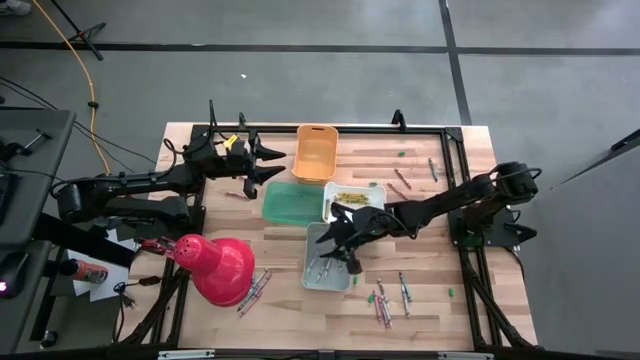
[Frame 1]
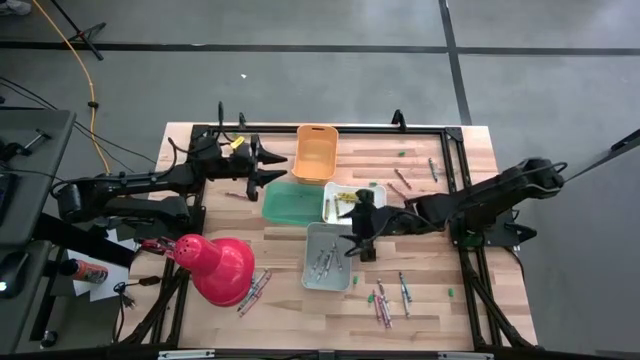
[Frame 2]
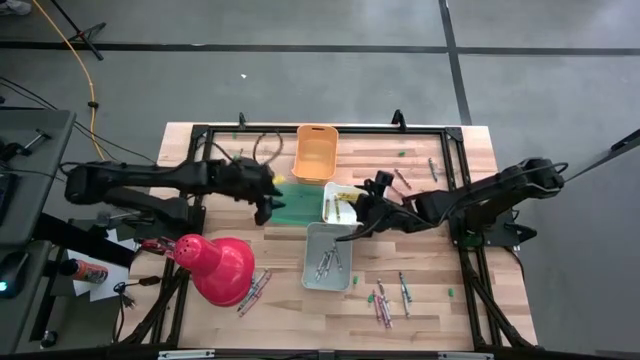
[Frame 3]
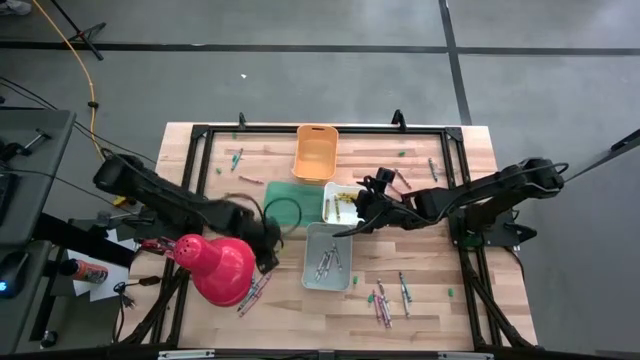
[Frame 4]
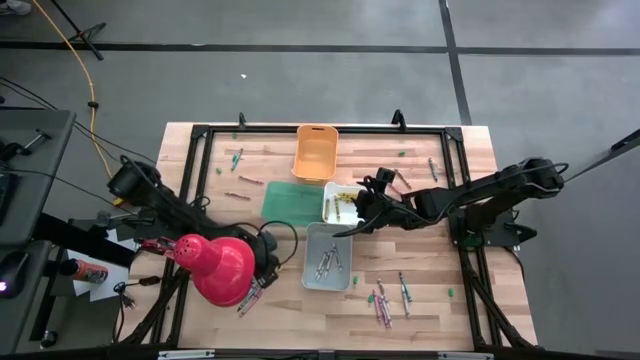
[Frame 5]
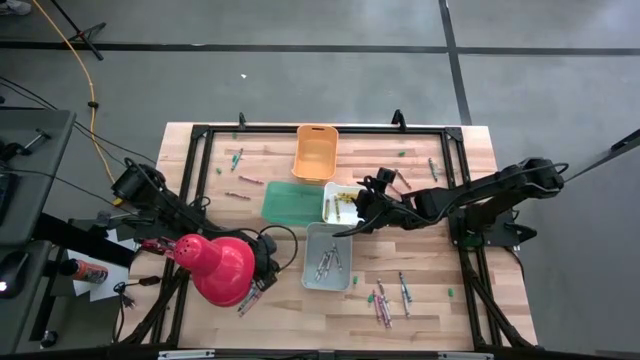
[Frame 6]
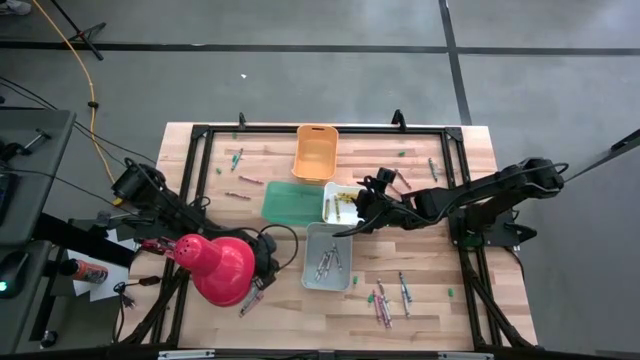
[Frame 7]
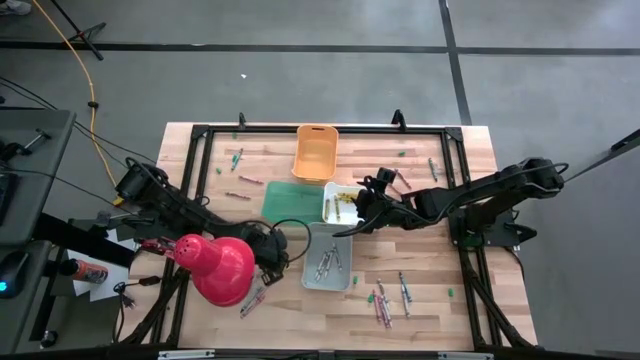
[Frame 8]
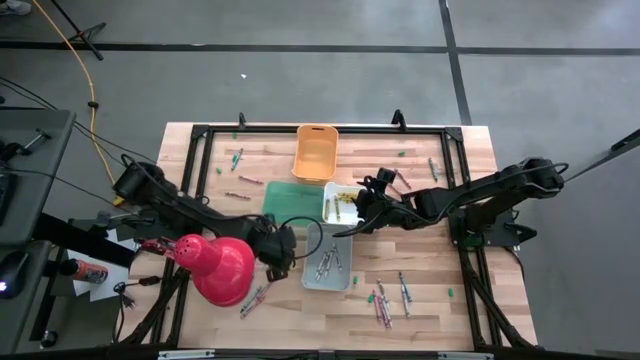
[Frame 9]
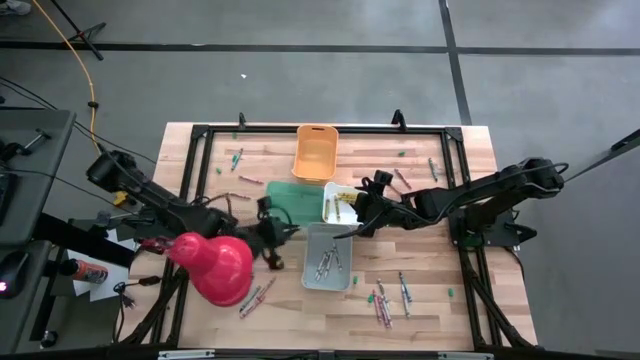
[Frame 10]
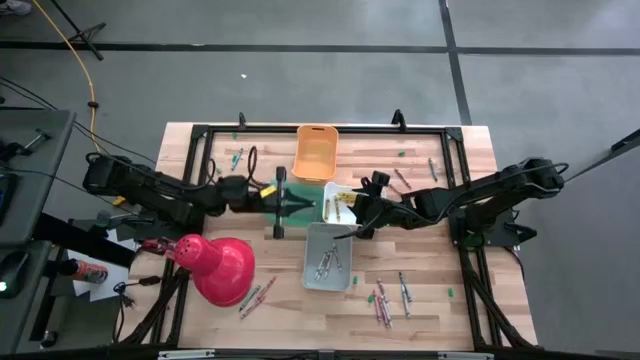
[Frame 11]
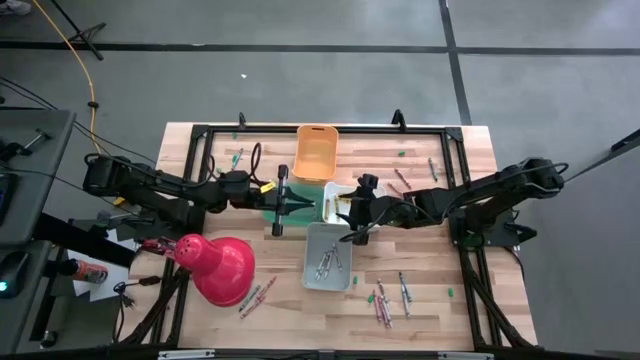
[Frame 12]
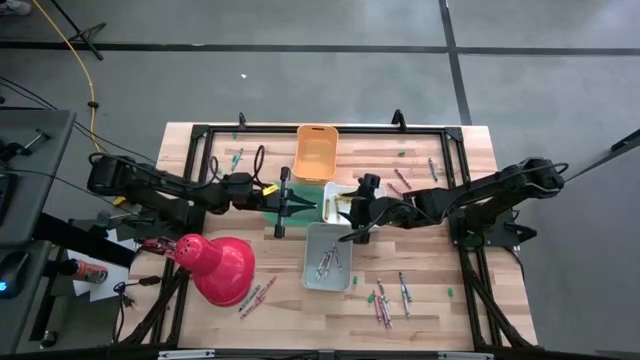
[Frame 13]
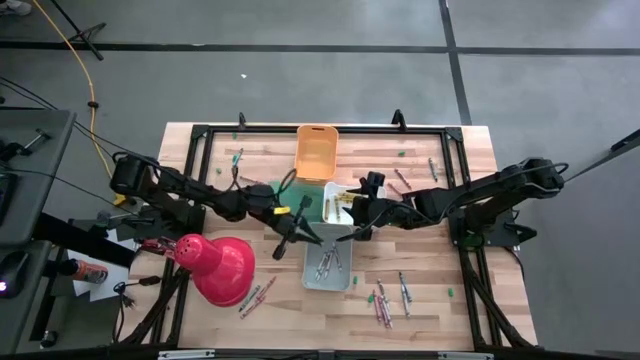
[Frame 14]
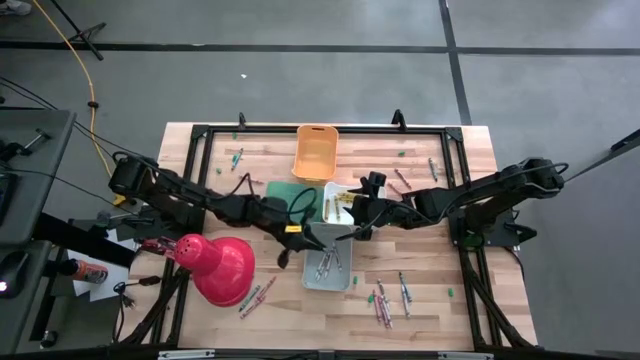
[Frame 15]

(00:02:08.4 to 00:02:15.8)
Task: Sort crayons
Put the white crayon into the gray bin

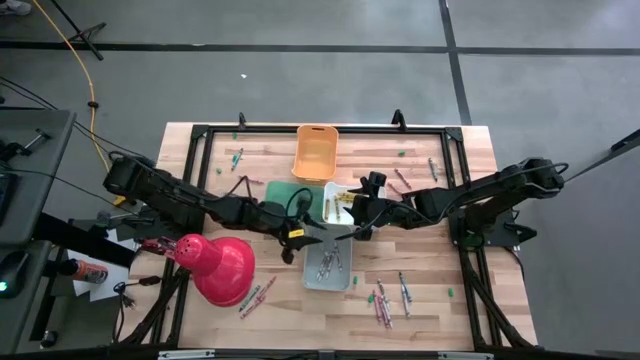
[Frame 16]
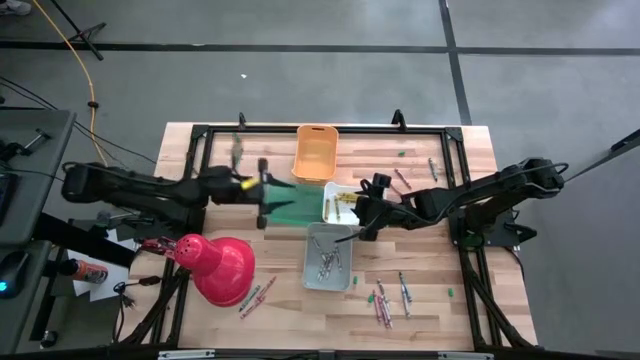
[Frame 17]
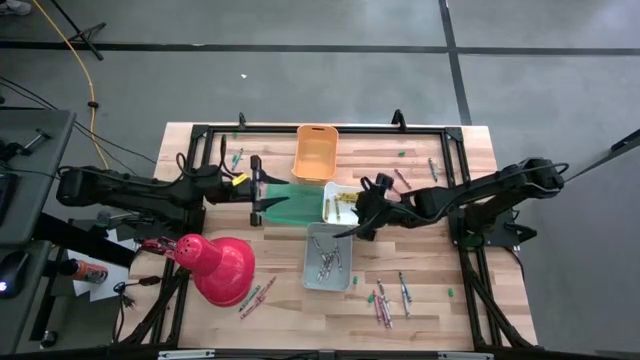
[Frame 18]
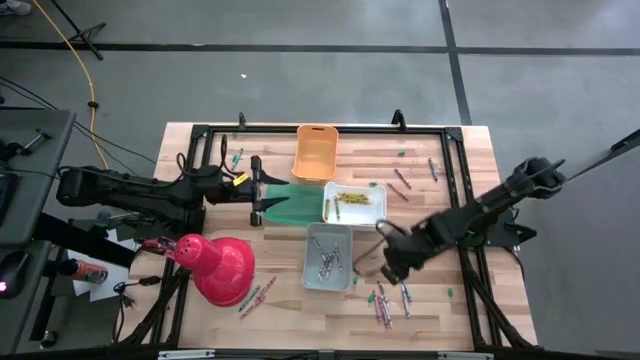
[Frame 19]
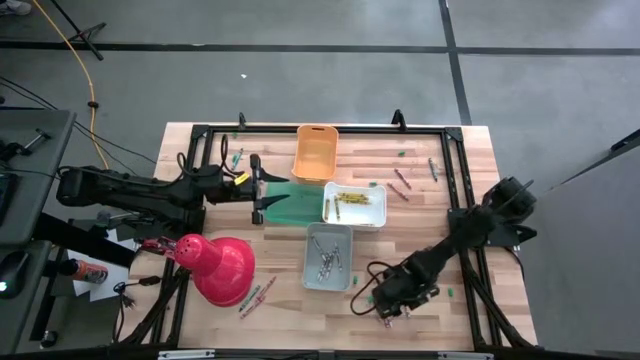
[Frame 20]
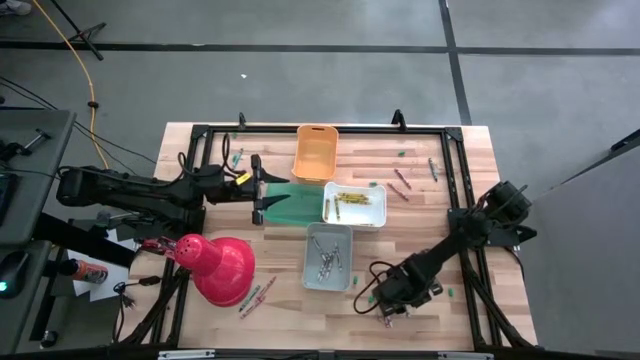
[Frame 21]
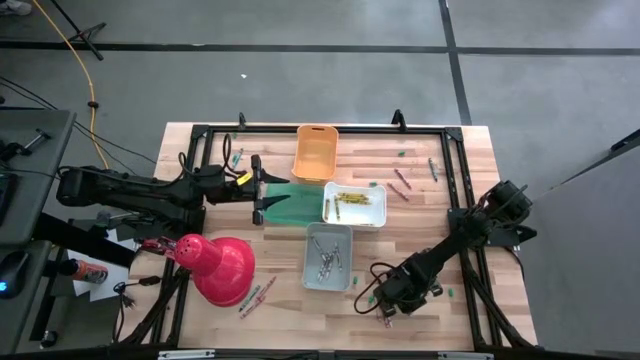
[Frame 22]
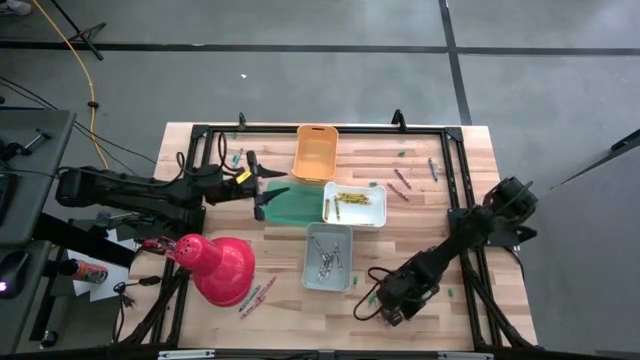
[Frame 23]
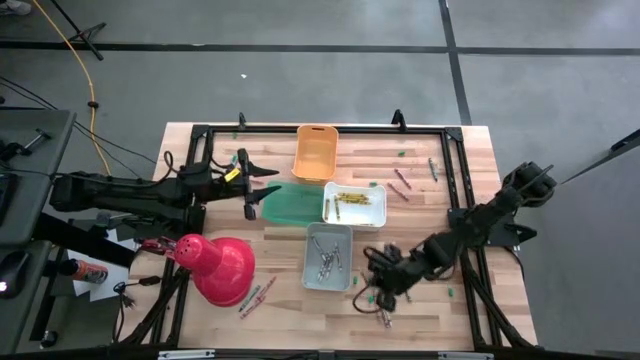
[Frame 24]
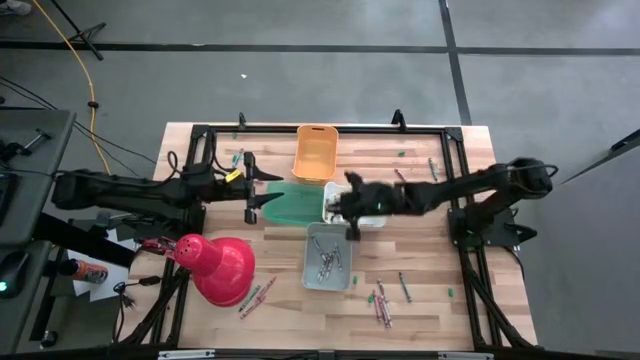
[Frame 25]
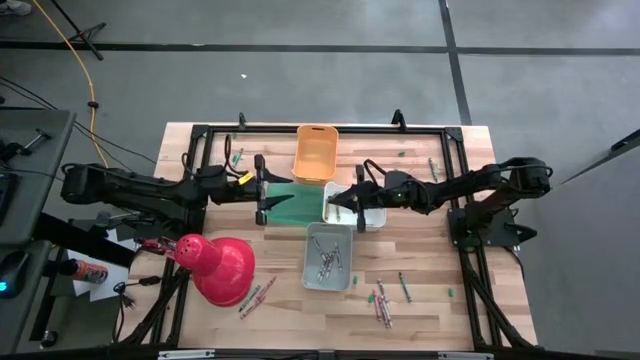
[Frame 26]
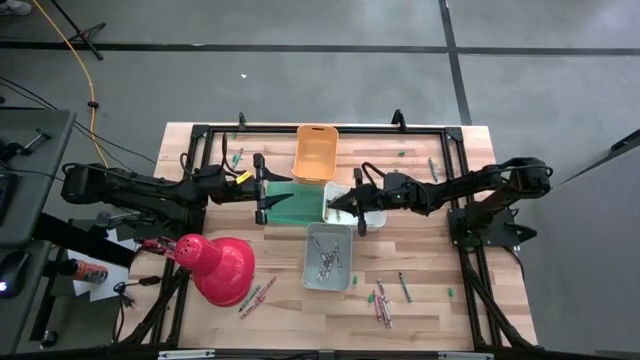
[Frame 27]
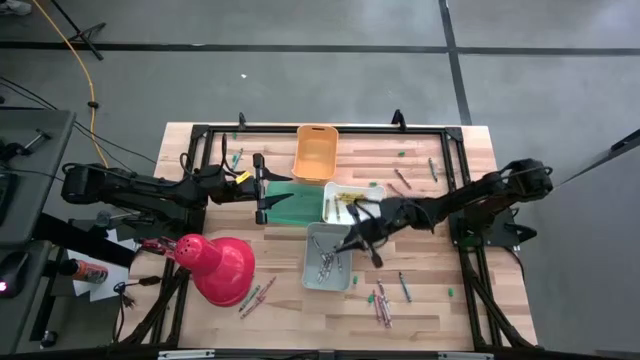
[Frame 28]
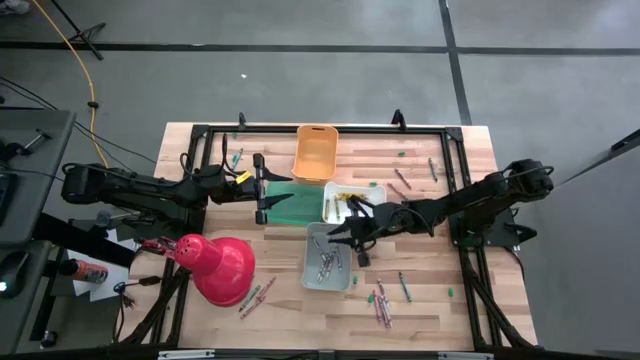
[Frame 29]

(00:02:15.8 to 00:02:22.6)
Put the white crayon into the gray bin

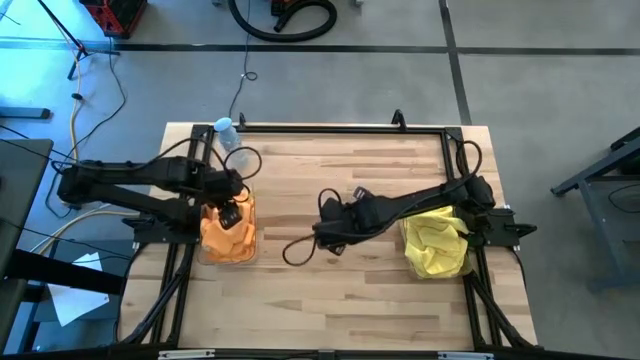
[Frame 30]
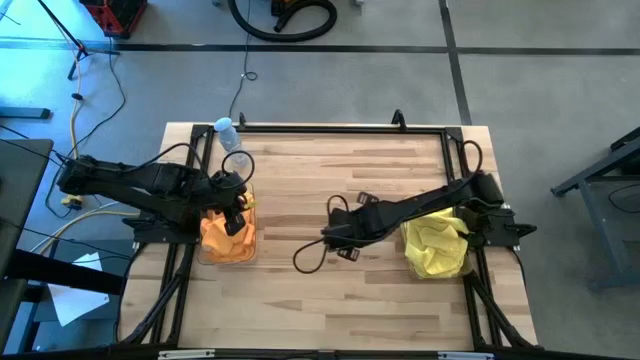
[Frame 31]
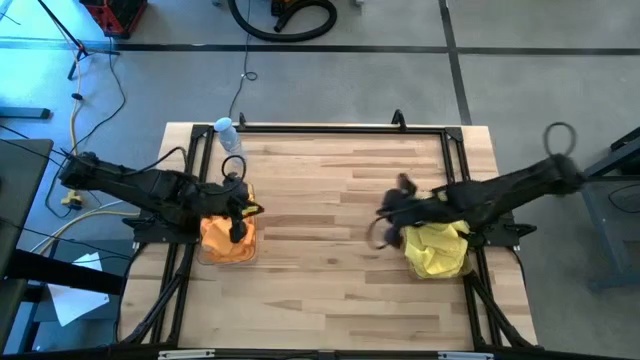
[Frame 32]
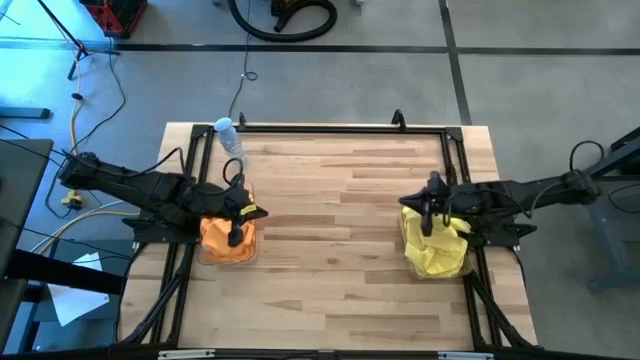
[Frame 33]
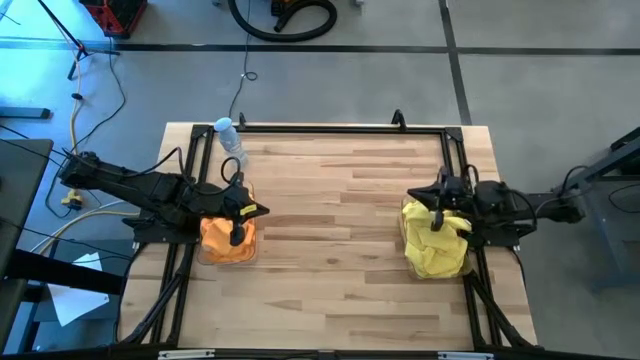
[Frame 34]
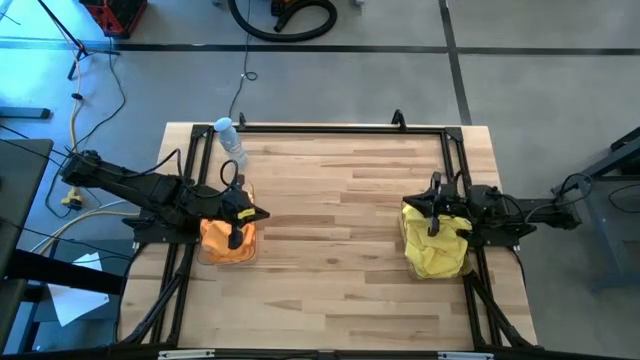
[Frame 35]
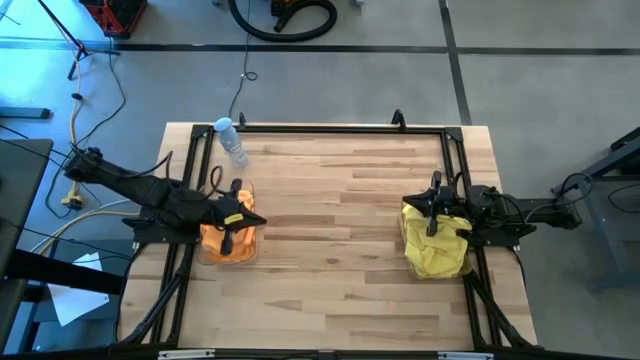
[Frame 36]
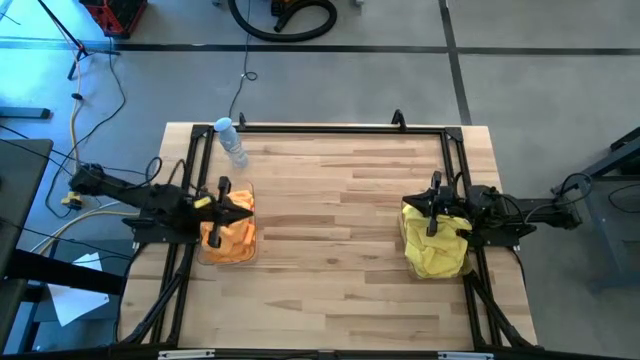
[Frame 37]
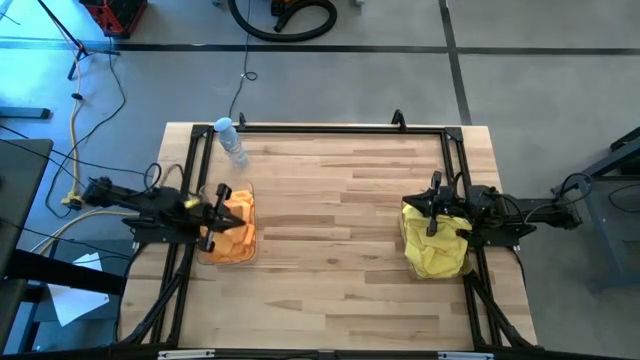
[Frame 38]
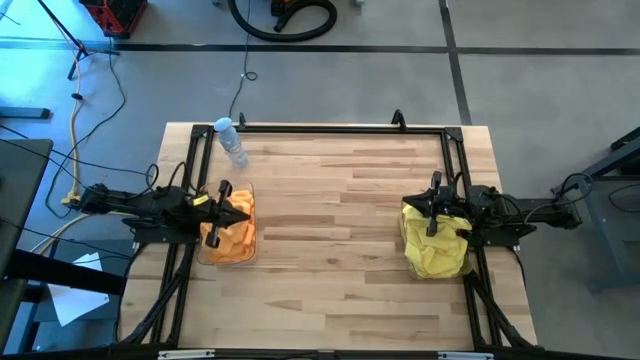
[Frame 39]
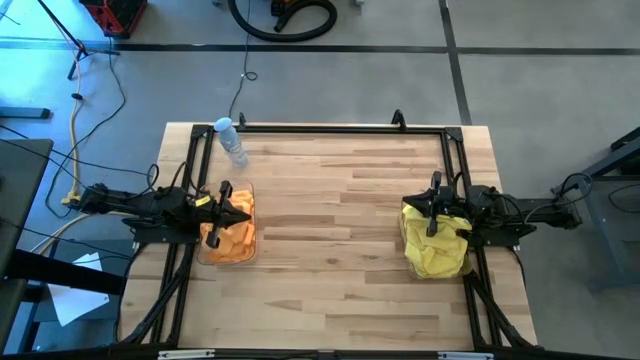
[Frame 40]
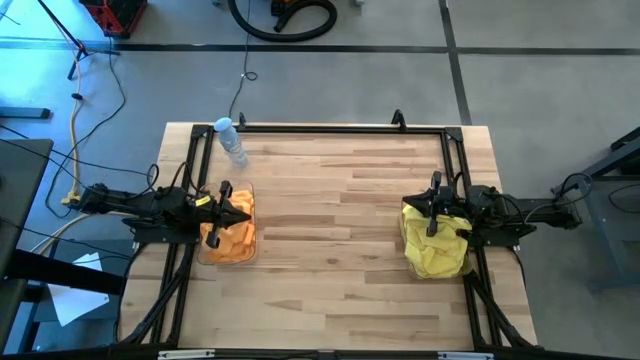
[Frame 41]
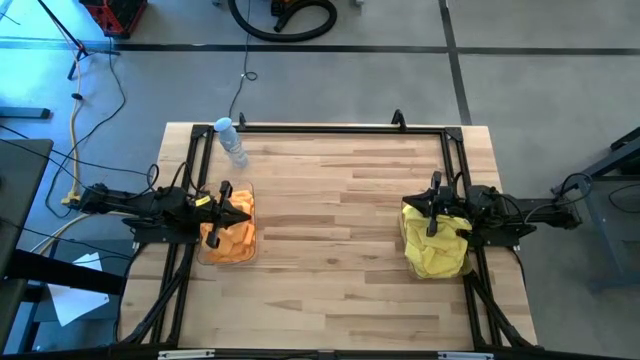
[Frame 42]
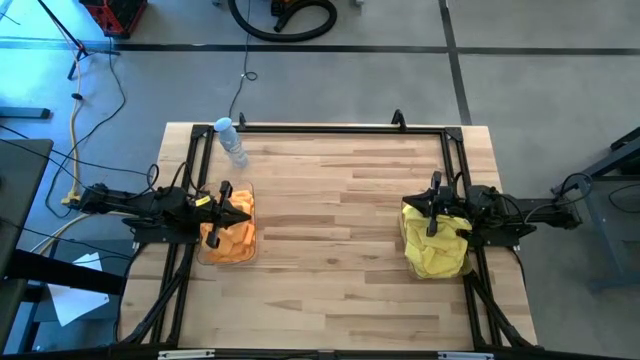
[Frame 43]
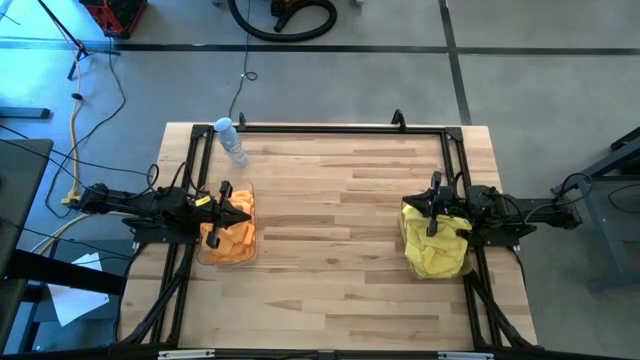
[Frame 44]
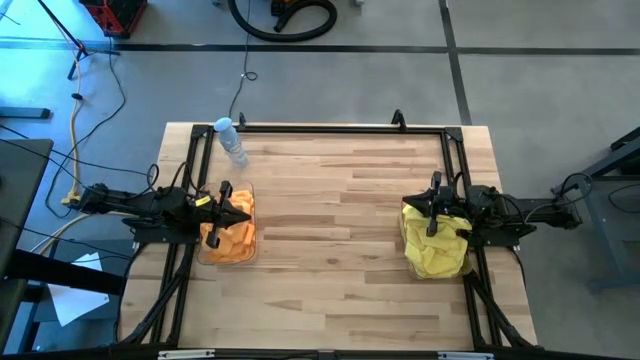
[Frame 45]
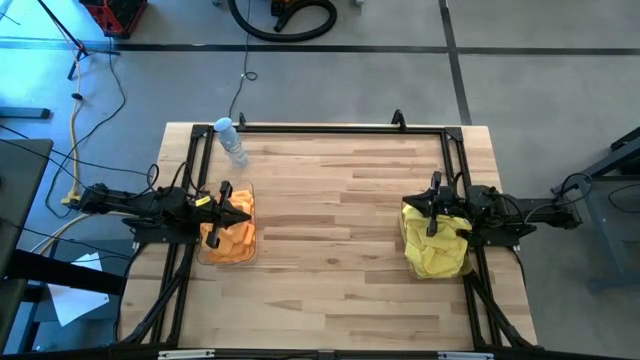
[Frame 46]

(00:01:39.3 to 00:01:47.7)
Task: Sort microfiber towel by color & place in baskets
Return to Home Position
